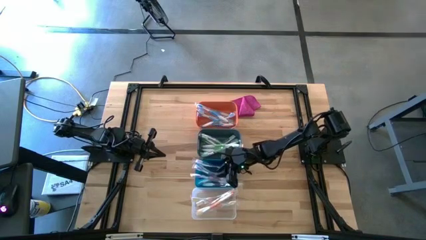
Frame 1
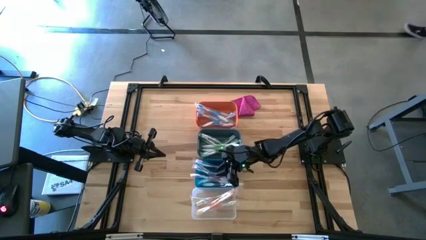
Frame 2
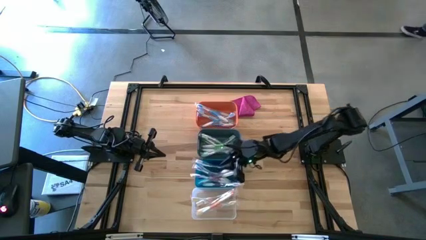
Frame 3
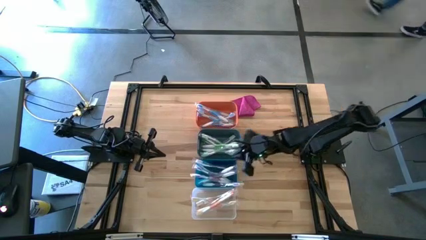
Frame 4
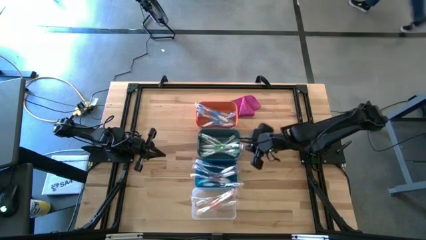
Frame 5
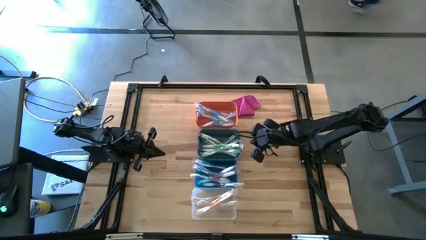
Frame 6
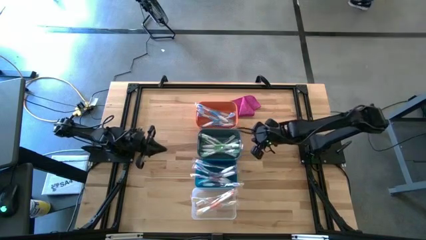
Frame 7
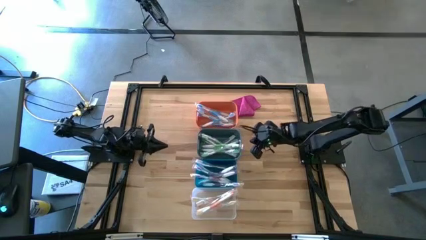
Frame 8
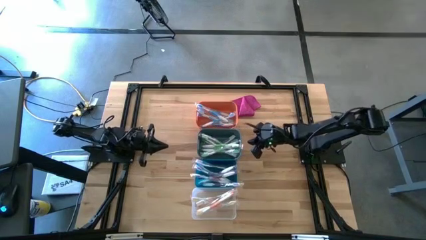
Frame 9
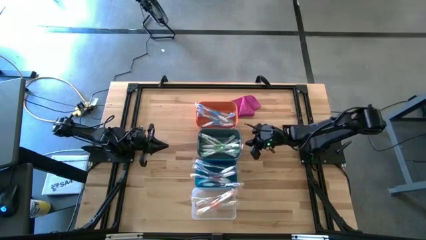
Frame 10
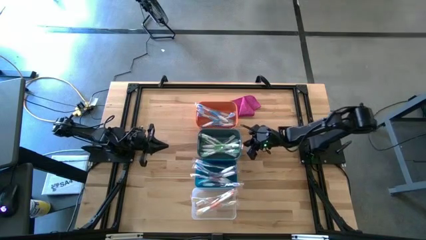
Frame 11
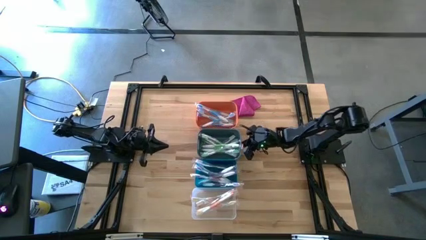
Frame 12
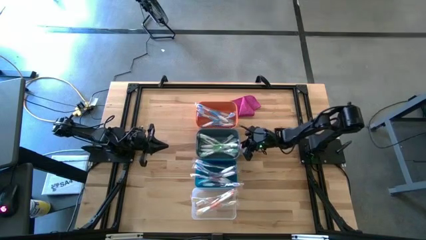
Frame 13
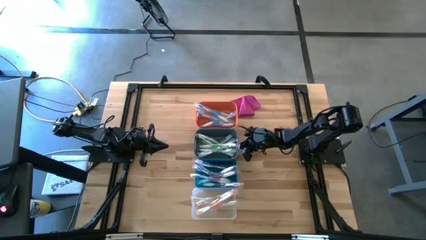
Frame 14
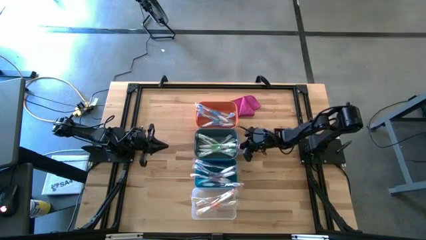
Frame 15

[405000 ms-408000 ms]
Task: Pick & Place Toothbrushes
Adjust the green bin

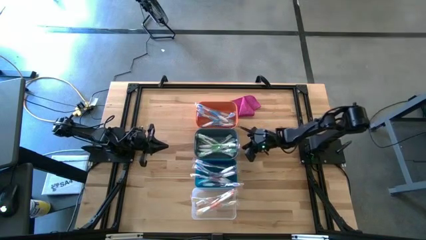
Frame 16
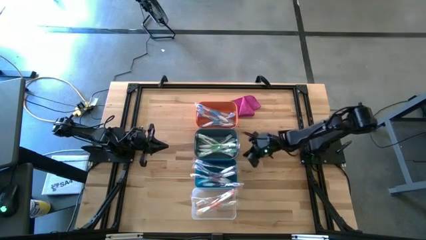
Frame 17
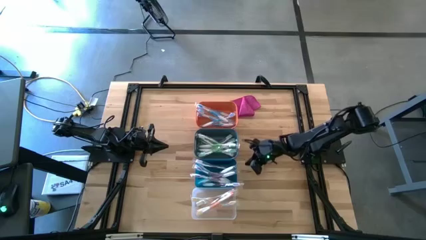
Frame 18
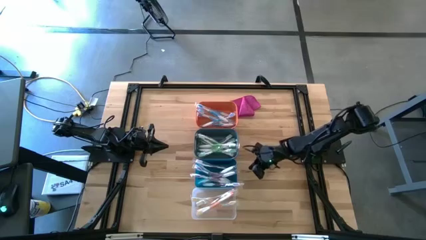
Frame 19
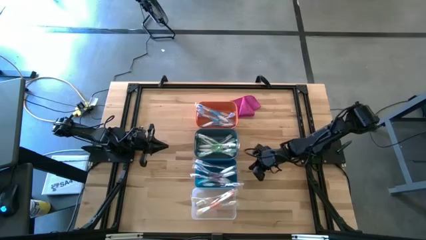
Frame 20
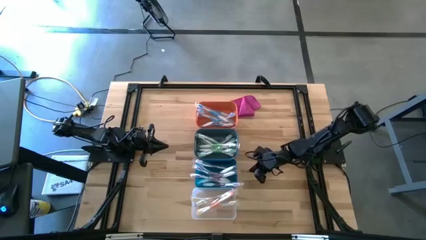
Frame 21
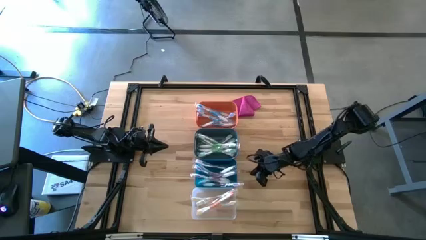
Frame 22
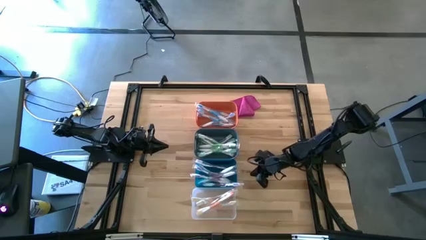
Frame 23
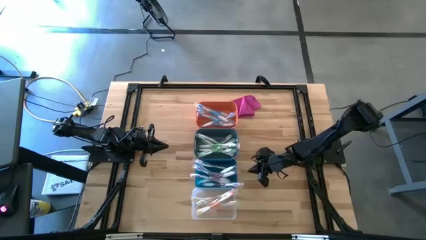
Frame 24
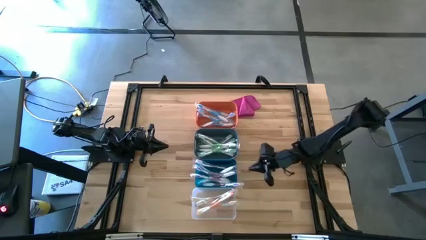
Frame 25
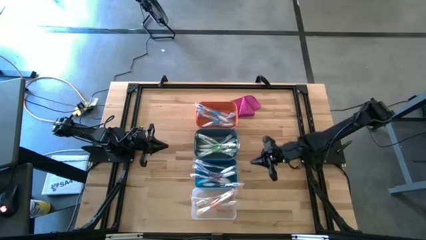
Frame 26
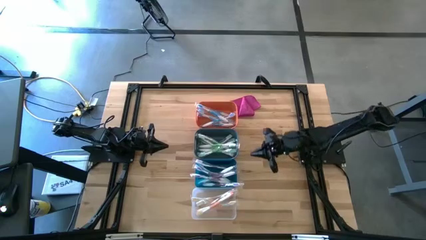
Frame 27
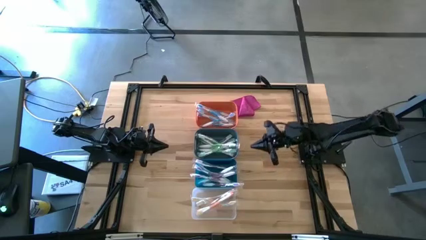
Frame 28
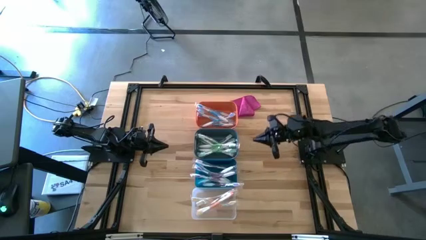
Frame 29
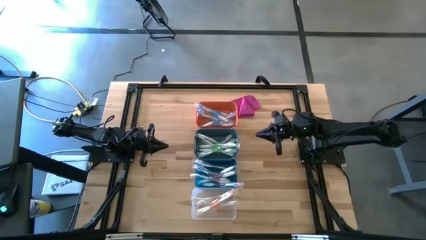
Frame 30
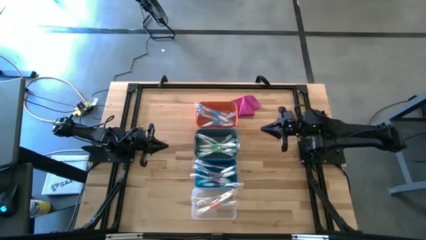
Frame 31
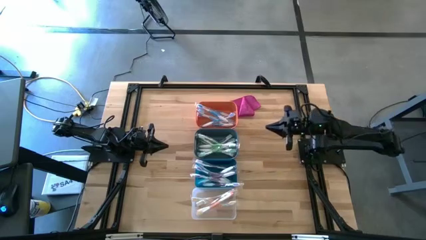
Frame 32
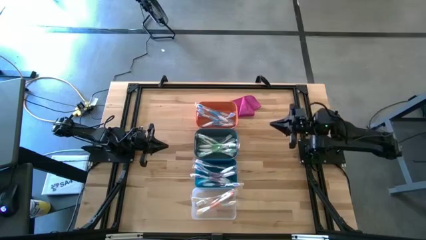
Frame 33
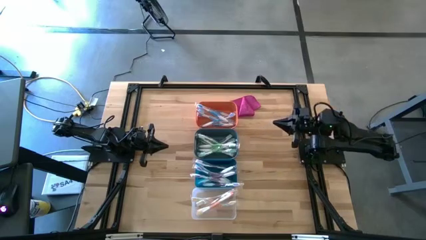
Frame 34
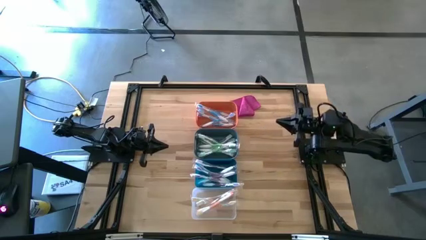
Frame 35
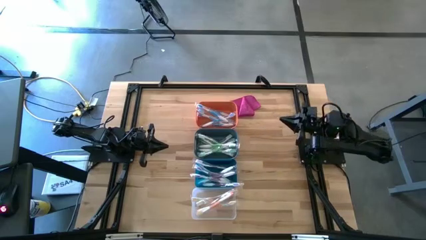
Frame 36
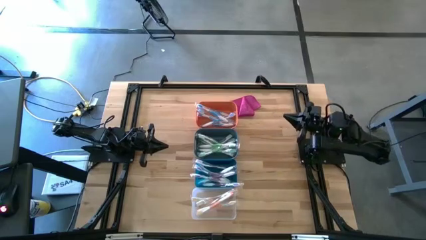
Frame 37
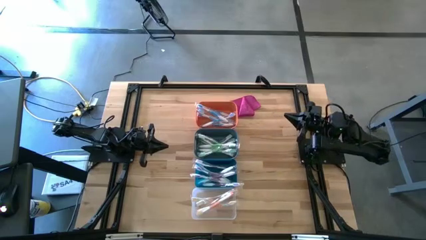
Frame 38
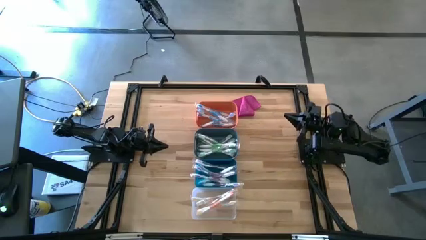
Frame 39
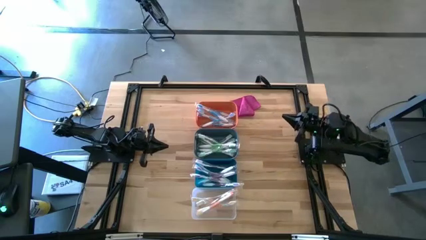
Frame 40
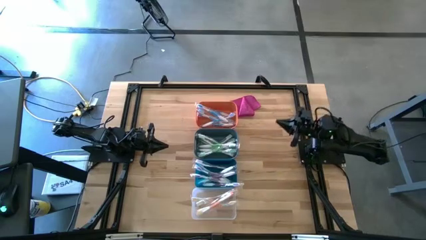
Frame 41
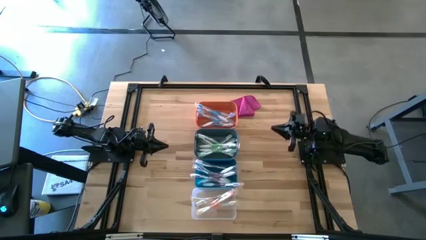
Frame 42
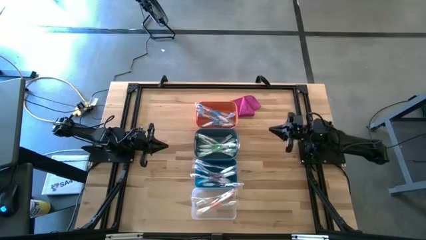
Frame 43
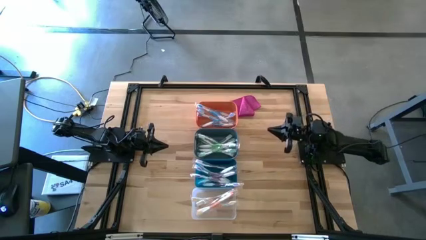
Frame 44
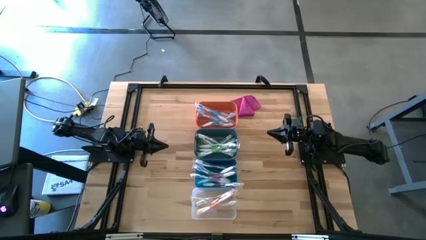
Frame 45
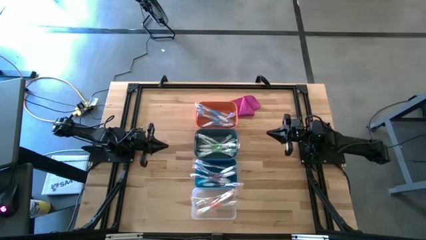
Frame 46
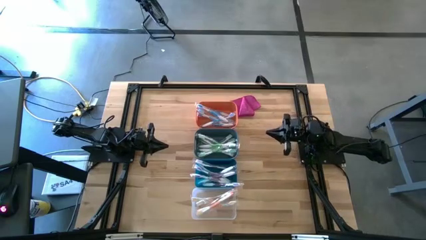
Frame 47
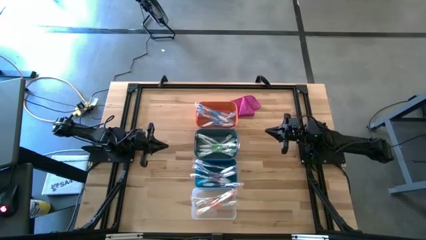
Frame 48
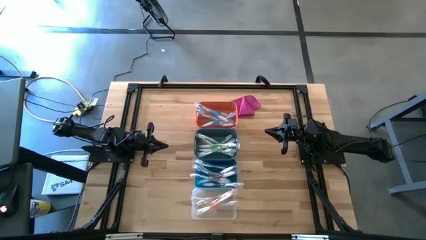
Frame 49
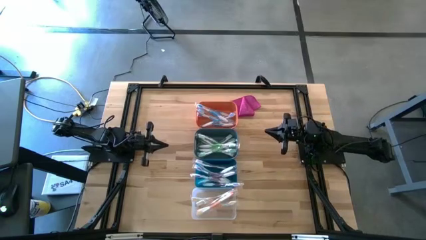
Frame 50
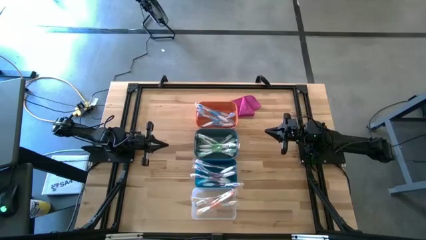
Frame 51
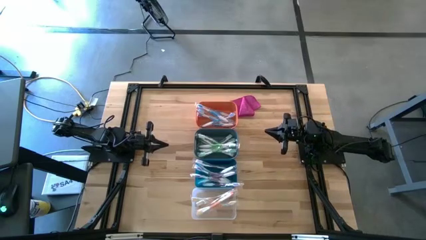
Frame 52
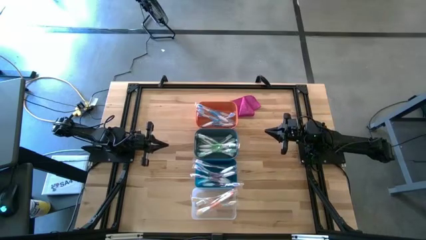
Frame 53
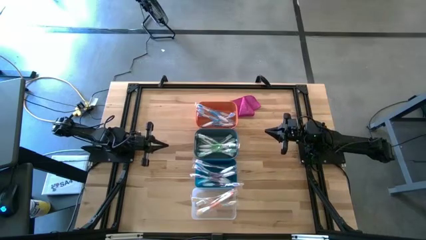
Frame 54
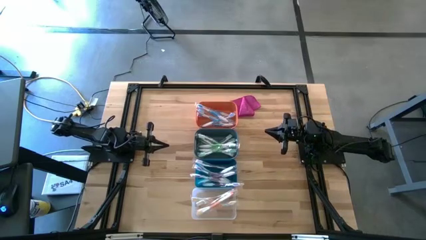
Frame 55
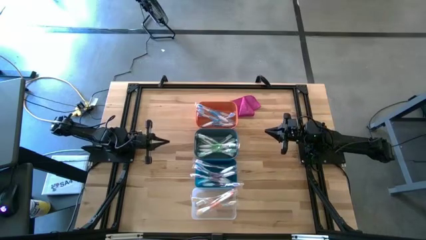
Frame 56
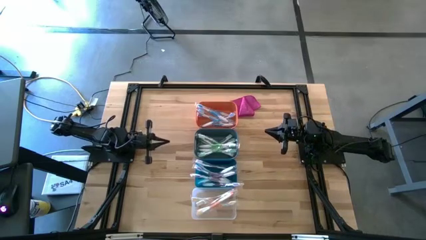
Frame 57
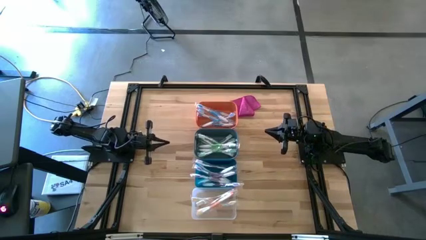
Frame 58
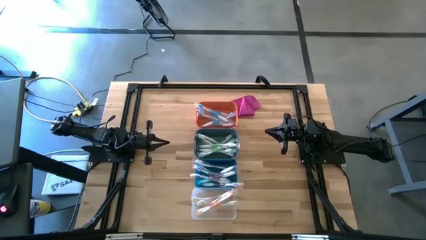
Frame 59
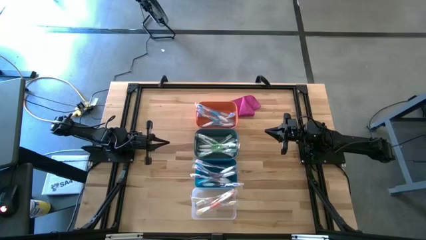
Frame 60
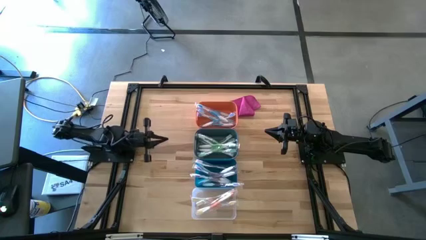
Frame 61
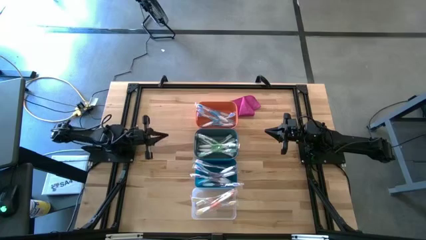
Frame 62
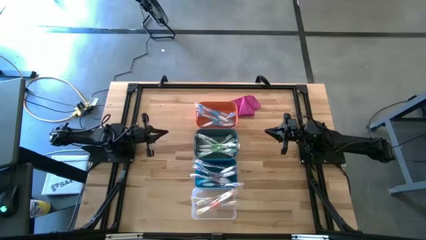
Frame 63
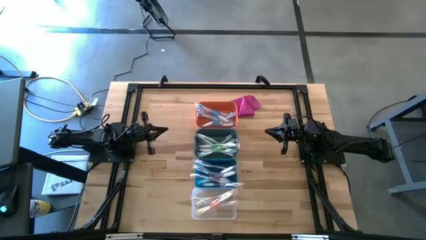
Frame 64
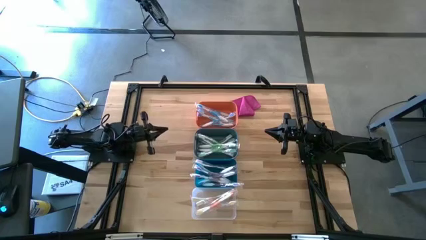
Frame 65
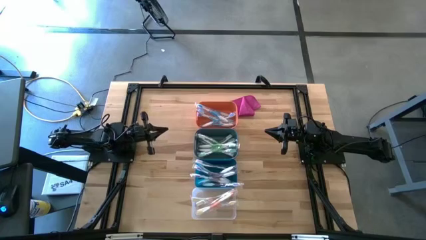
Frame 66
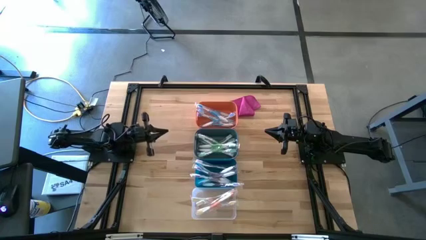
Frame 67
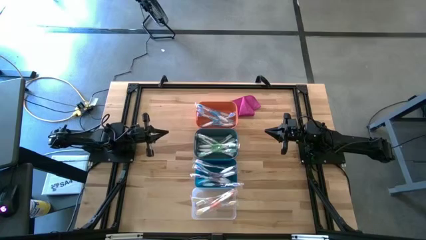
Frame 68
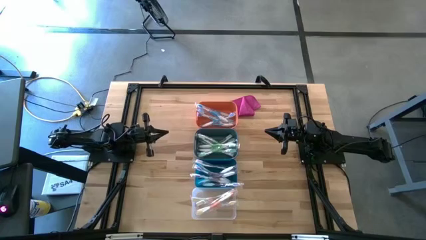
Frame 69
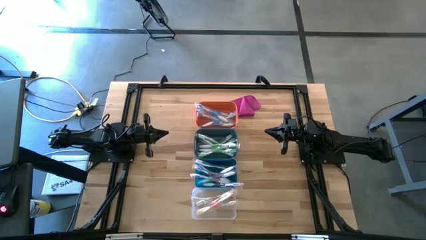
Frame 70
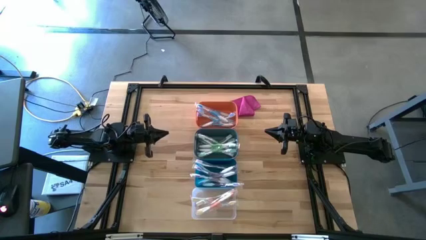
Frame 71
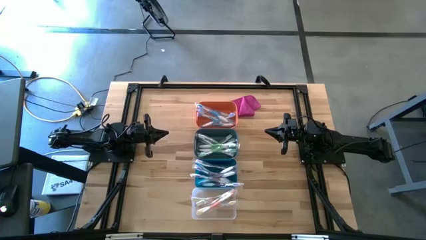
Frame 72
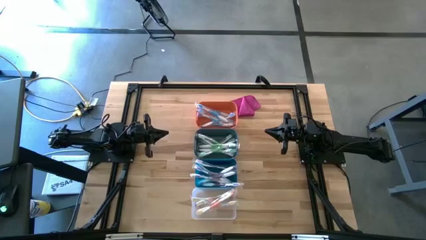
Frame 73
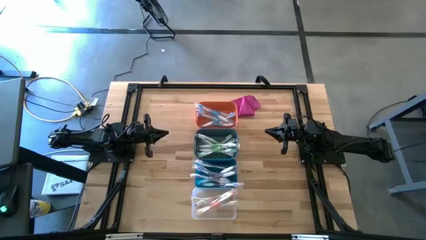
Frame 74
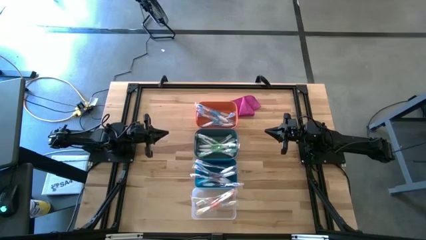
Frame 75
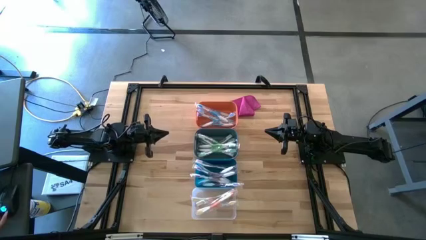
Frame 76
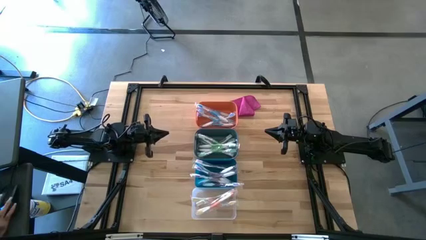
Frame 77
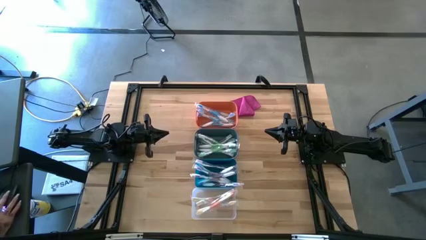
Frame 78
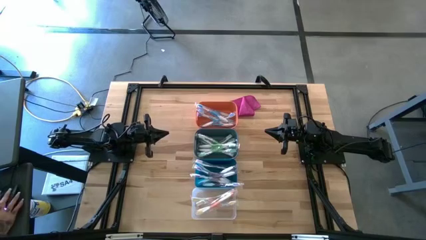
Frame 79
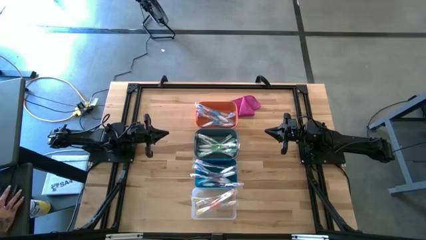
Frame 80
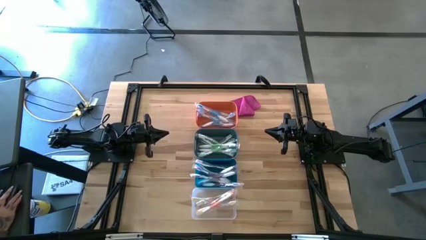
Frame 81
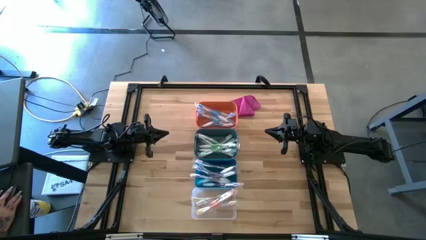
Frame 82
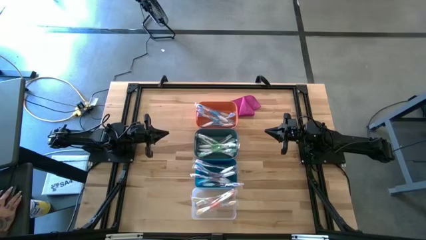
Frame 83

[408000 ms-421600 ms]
Return to Home Position
